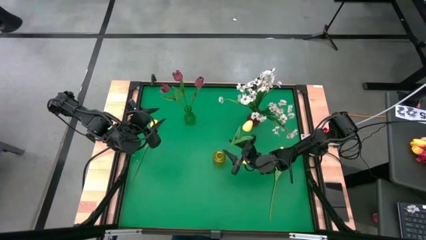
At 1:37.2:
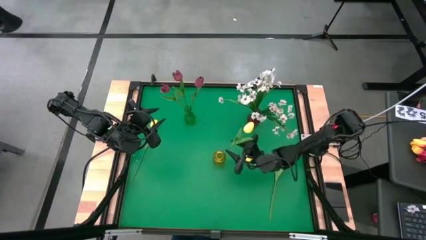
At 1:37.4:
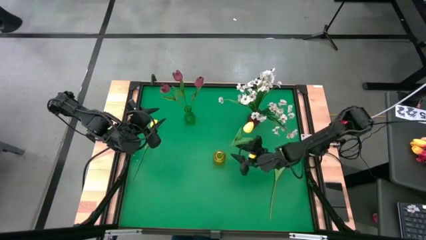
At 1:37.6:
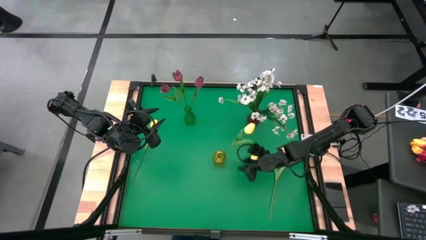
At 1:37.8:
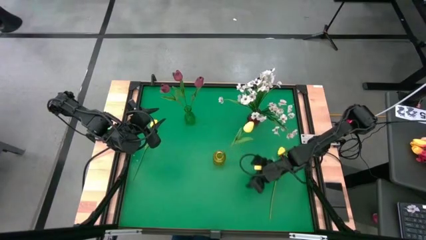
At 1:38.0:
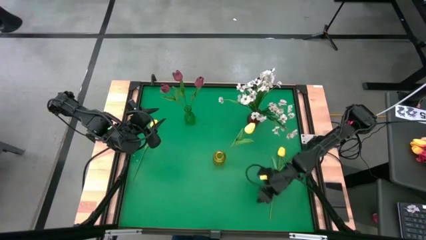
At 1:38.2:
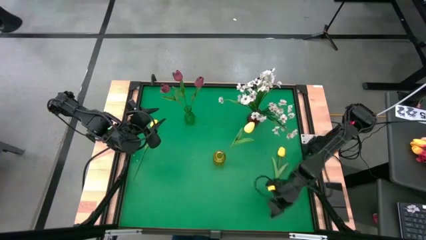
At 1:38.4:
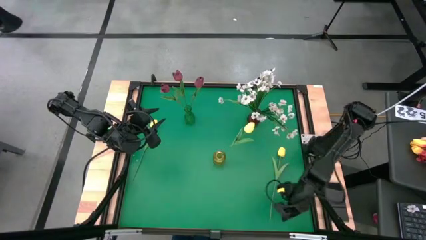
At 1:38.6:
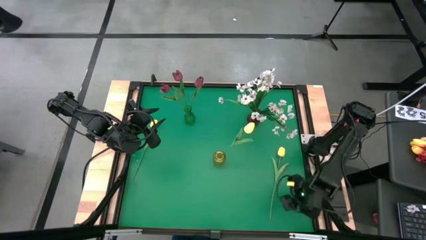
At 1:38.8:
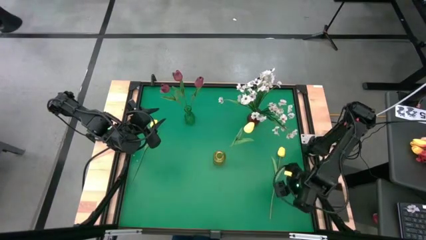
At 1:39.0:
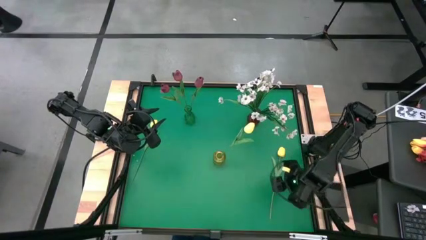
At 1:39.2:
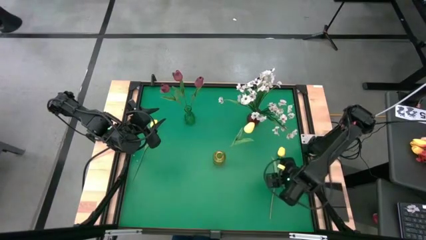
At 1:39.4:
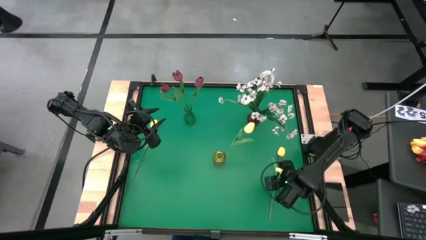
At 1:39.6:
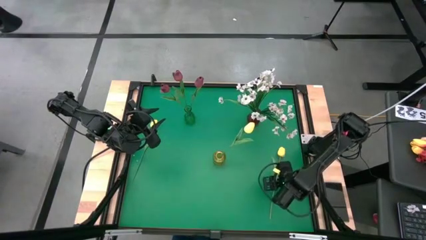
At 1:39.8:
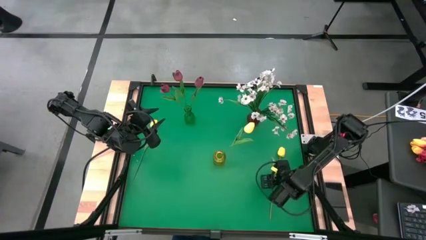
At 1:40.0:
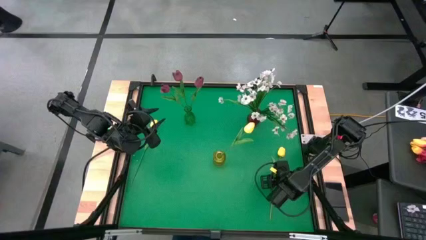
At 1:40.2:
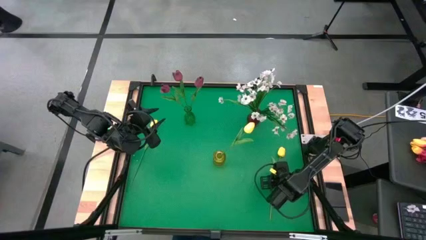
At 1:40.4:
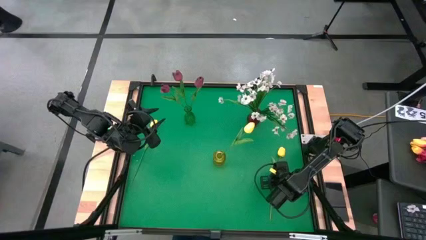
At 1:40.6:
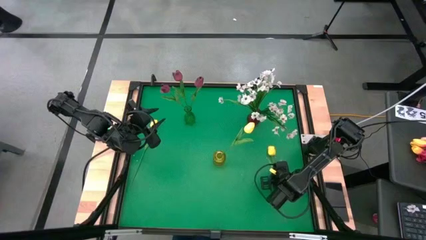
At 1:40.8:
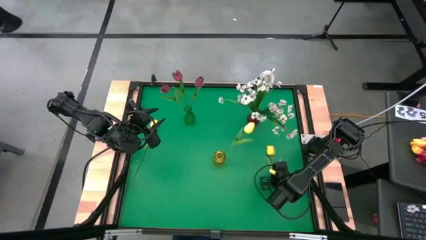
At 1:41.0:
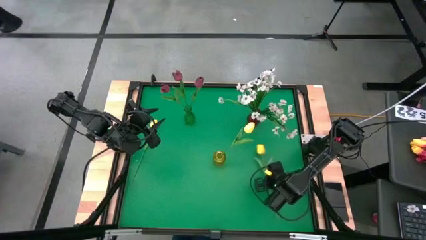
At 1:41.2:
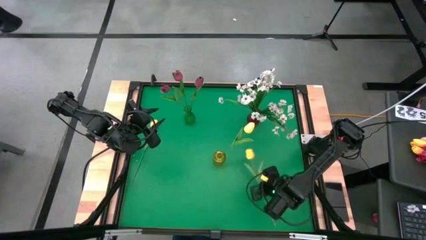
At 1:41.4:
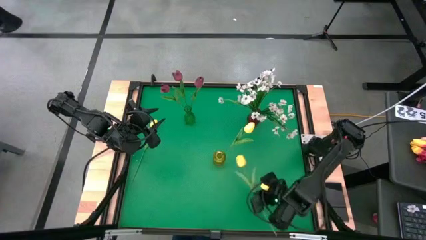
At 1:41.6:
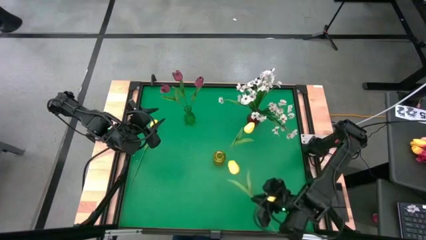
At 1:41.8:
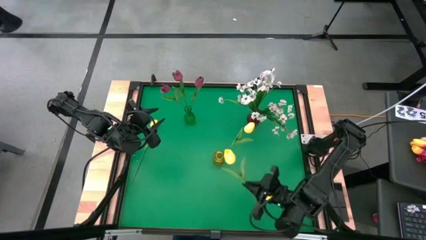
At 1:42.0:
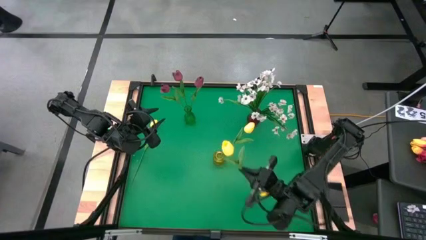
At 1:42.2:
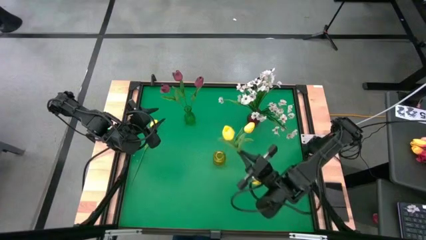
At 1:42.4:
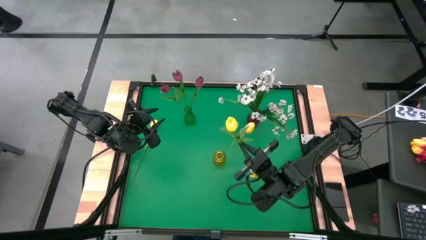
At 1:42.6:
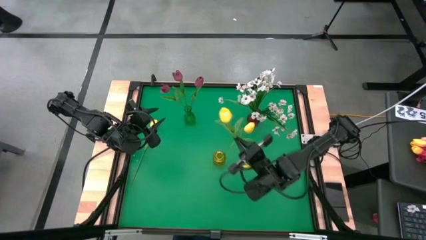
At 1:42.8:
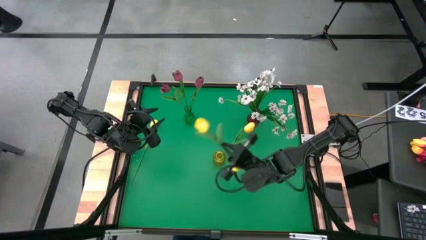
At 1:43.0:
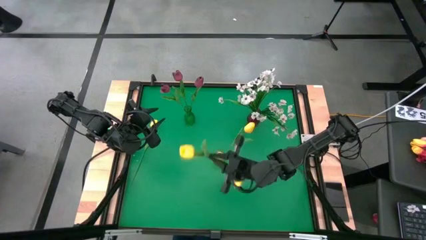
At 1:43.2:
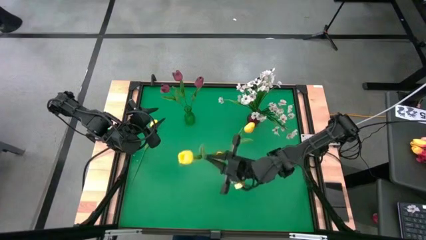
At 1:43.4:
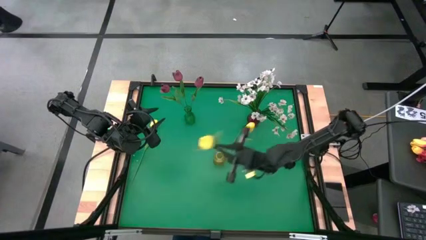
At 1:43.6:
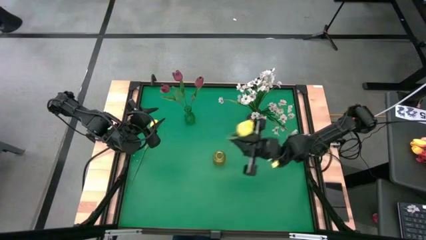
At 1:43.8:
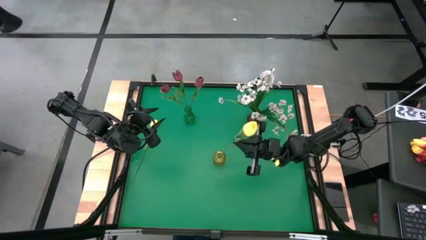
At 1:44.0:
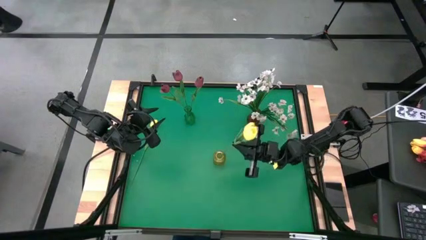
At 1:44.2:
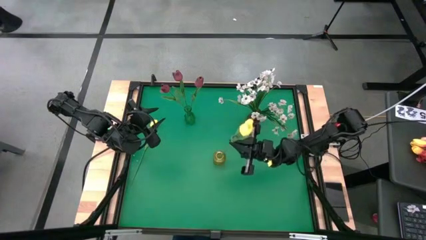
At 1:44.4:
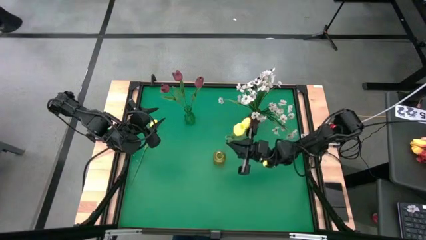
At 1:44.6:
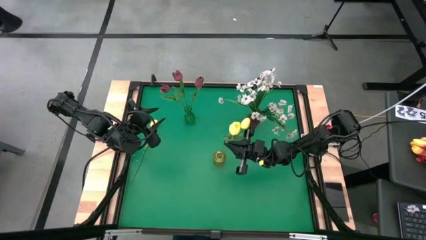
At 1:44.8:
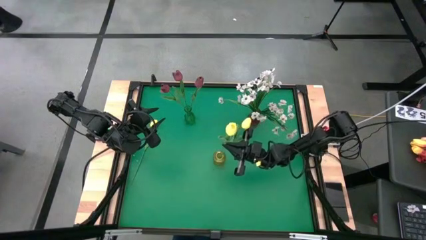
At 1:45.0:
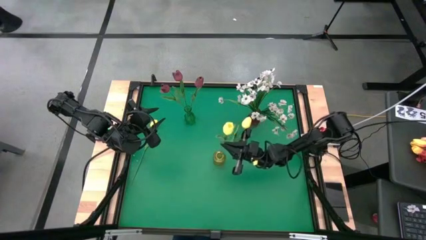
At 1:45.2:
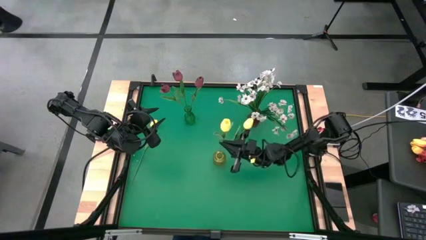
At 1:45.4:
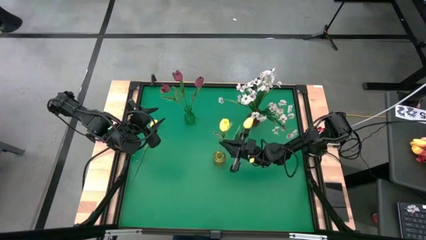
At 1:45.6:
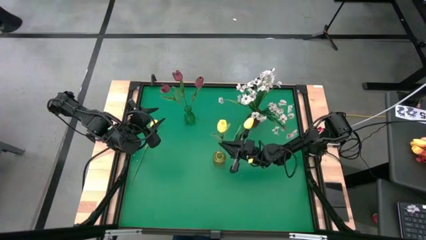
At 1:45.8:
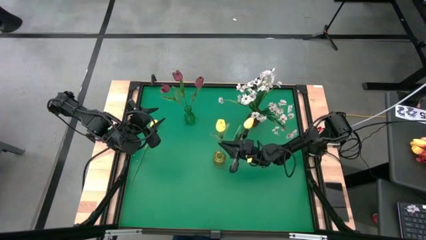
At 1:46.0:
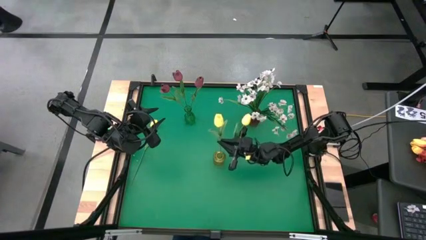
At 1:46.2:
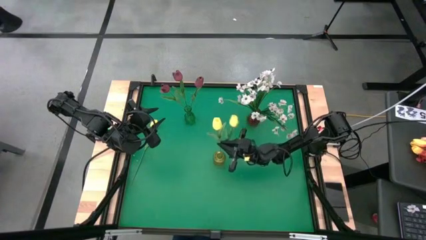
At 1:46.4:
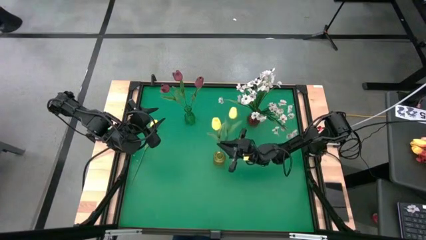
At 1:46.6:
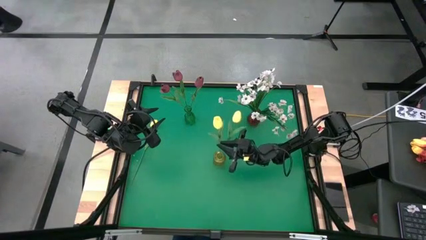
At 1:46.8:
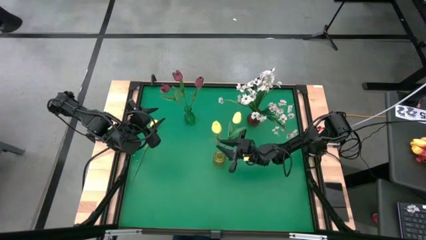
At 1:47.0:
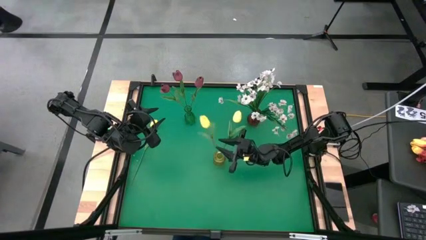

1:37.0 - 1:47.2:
Task: Sort flowers into vase by color
Put the right yellow flower into the yellow vase

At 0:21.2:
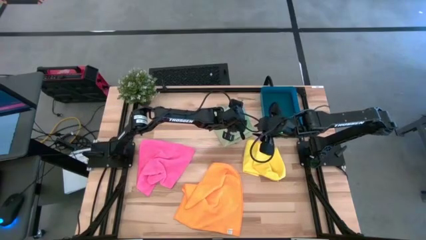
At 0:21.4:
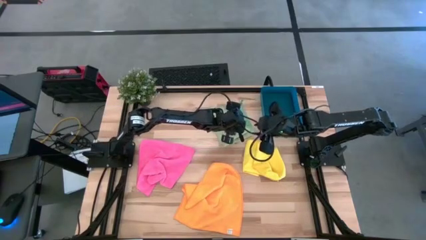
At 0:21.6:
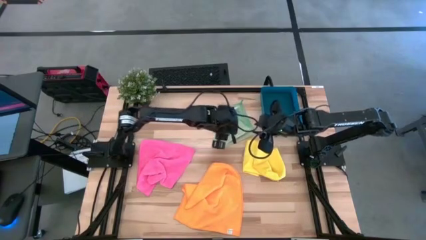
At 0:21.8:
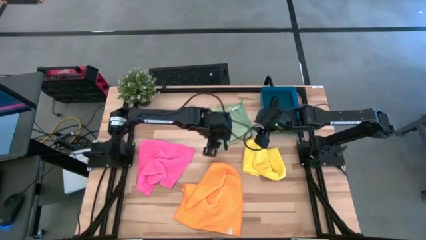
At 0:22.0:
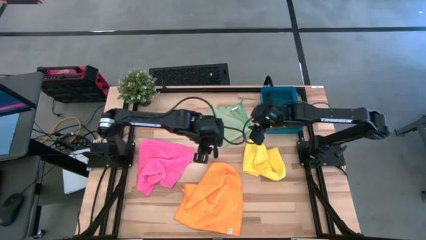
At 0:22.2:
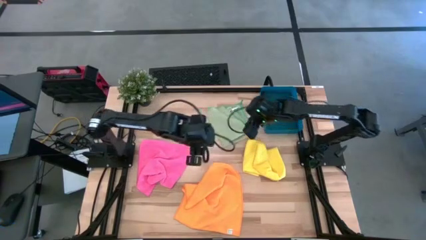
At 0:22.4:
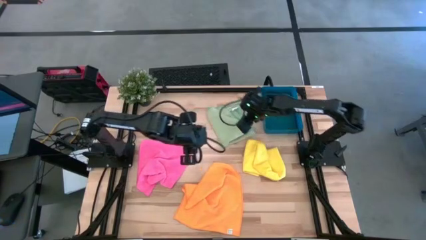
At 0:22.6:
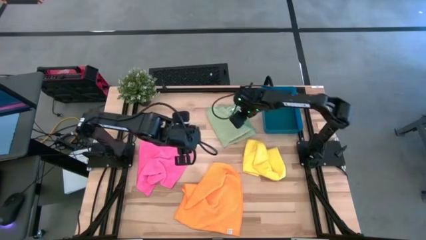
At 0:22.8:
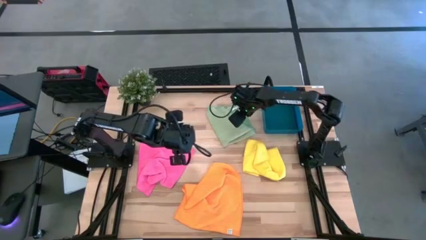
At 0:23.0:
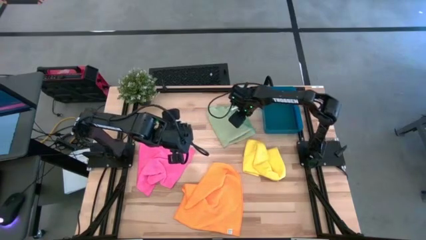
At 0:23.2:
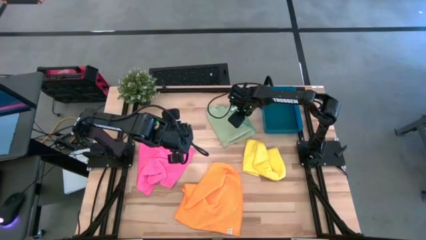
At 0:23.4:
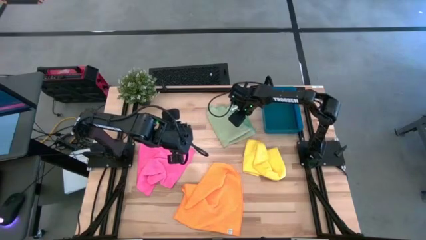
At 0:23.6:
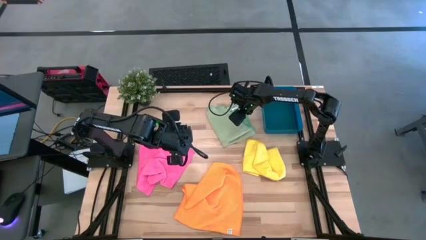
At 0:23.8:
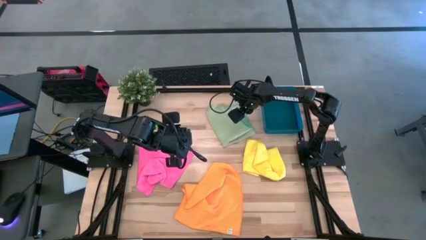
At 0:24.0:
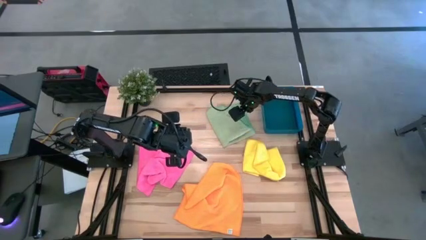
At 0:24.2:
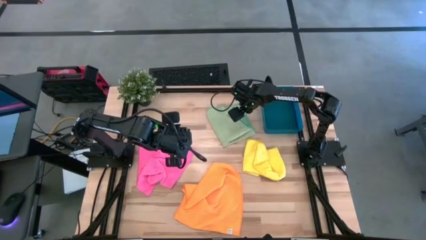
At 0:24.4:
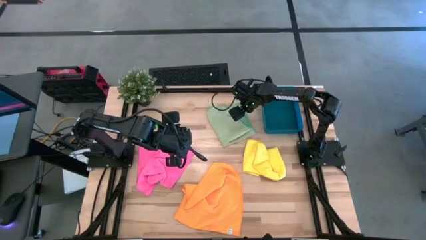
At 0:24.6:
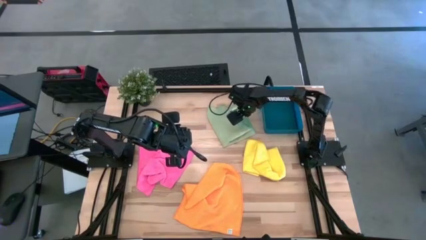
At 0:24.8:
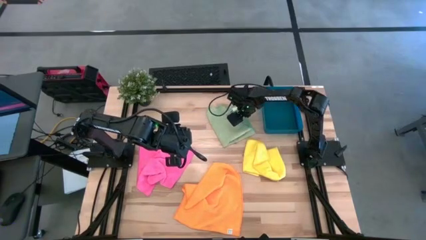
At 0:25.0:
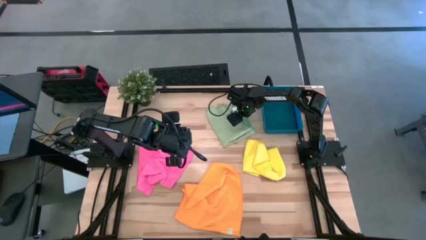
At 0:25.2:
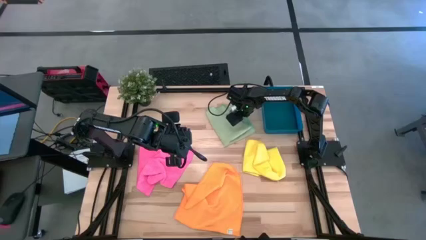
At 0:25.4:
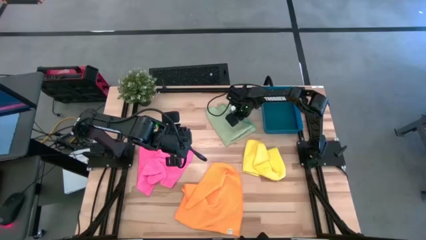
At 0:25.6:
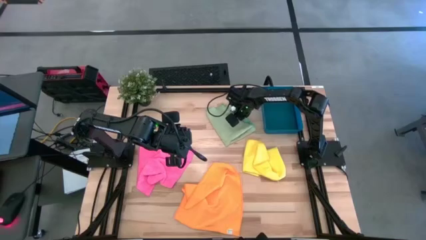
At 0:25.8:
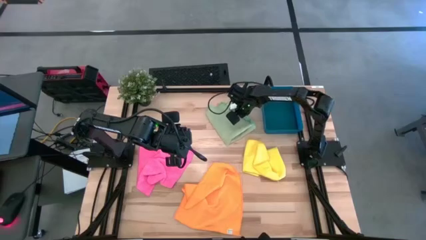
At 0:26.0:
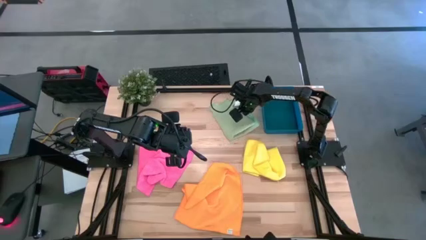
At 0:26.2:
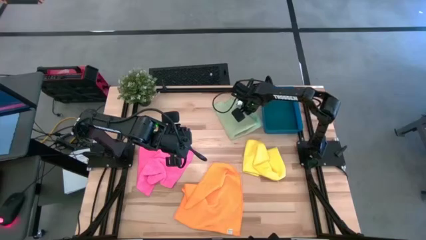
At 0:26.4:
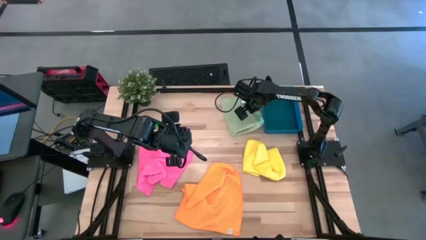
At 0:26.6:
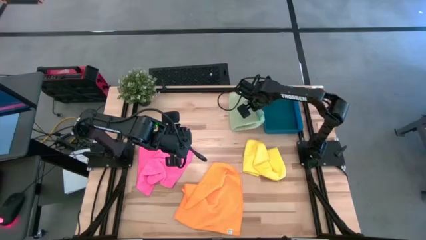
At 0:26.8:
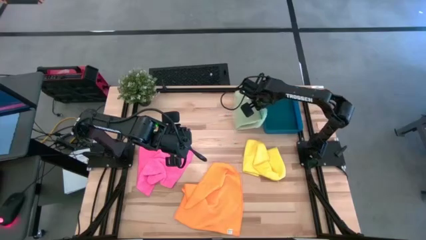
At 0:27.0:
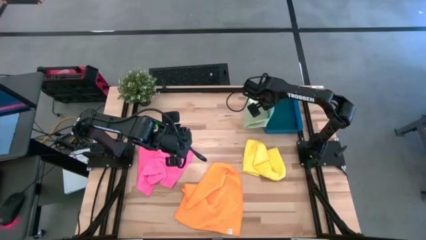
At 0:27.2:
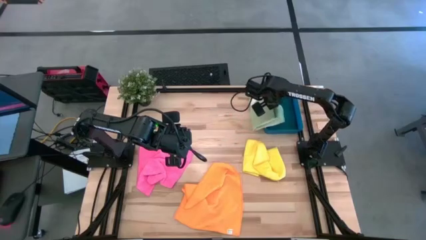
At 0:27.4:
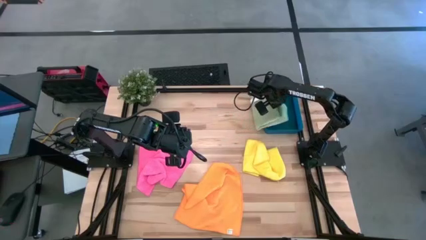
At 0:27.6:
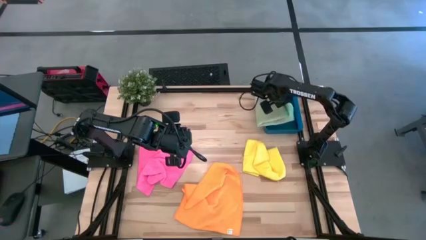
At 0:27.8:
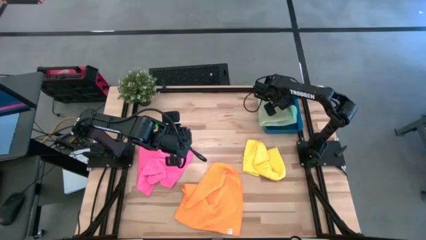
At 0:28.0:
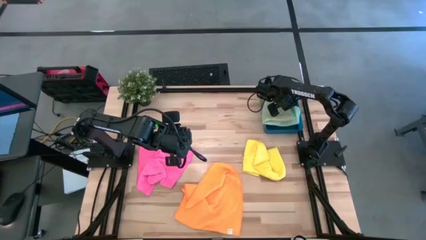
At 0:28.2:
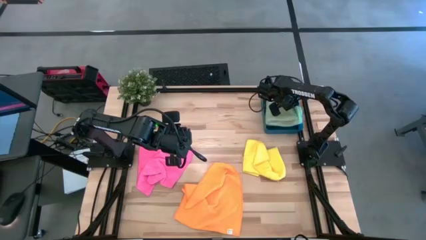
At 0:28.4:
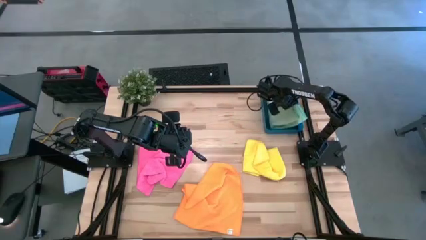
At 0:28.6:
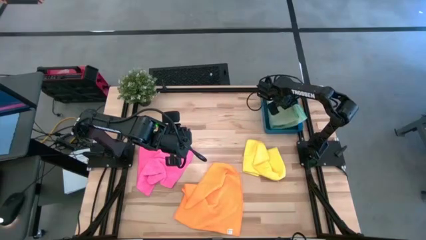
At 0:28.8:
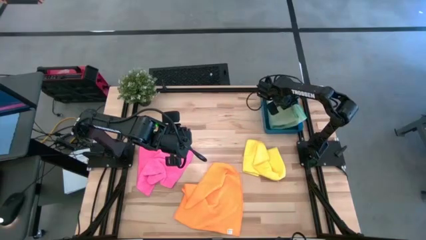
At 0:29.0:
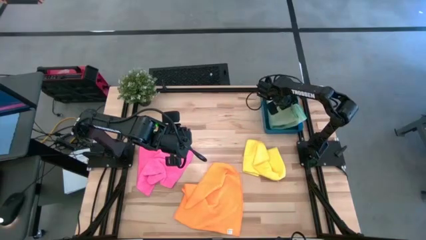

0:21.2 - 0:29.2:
Task: Fold microfiber towels
Put the green folded microfiber towel into the bin
